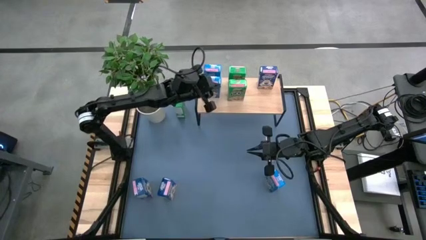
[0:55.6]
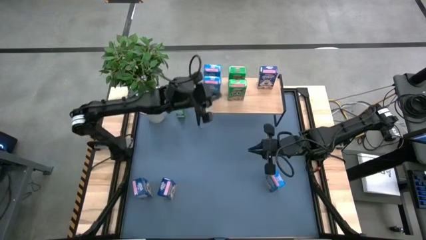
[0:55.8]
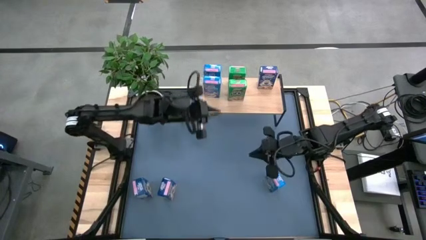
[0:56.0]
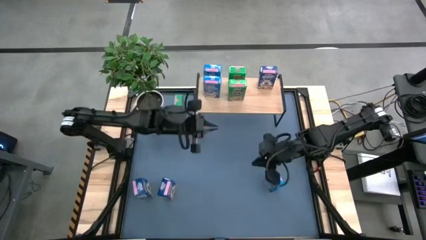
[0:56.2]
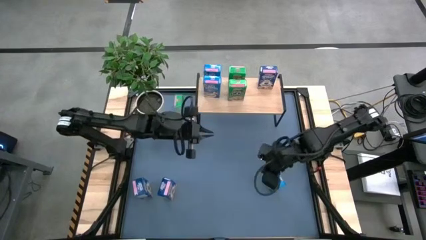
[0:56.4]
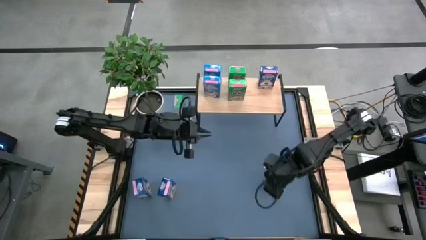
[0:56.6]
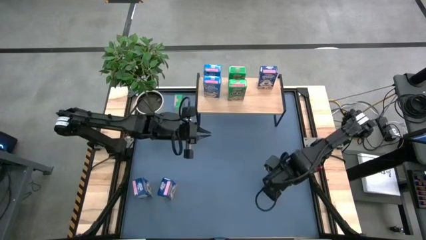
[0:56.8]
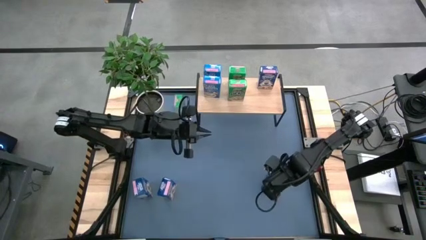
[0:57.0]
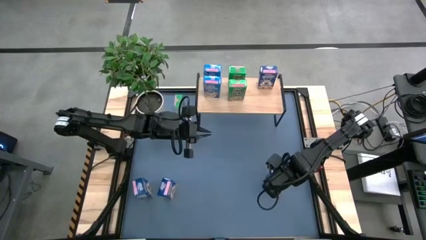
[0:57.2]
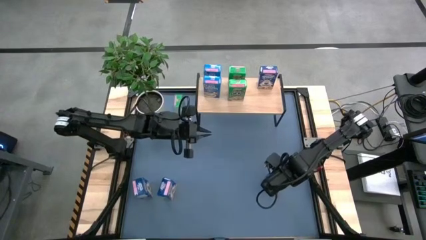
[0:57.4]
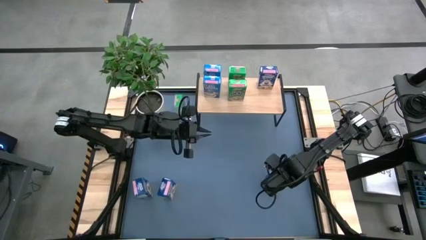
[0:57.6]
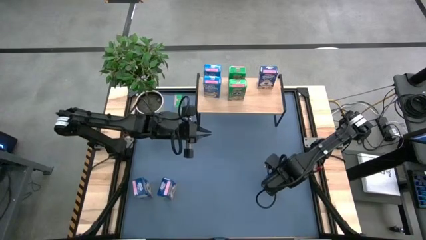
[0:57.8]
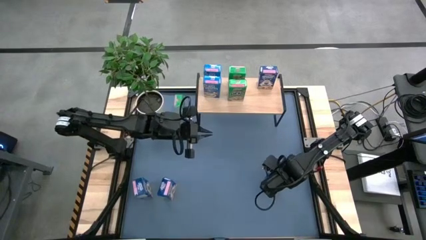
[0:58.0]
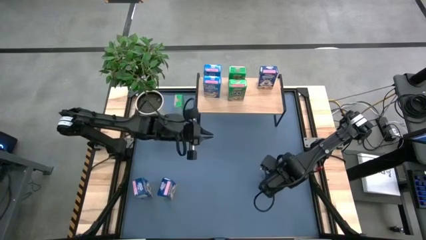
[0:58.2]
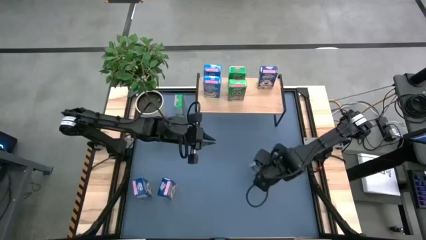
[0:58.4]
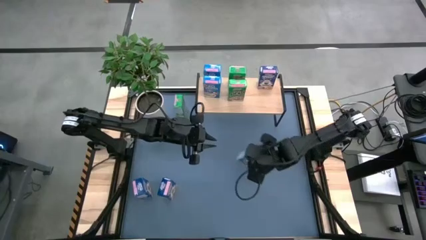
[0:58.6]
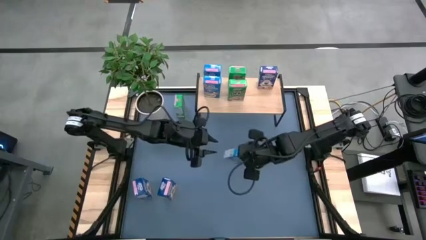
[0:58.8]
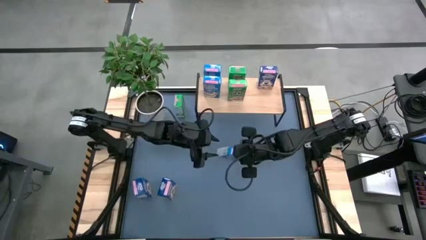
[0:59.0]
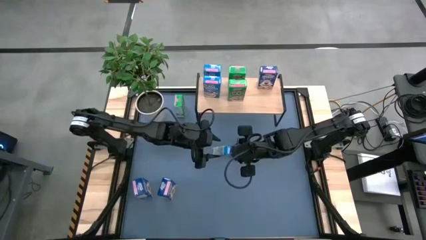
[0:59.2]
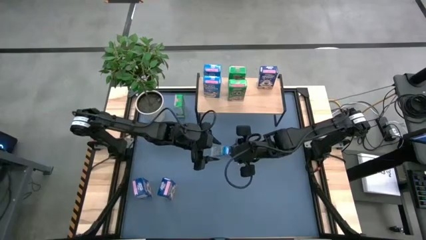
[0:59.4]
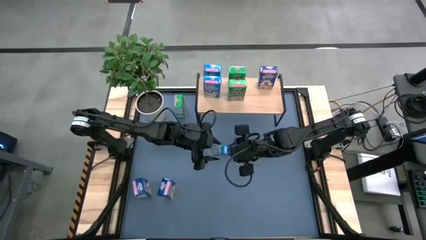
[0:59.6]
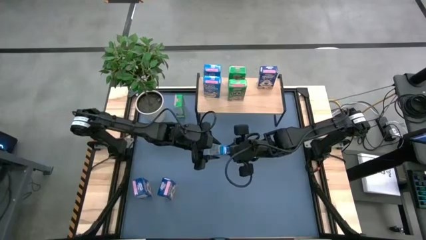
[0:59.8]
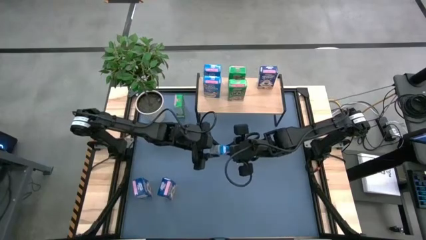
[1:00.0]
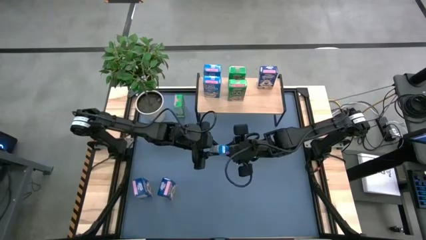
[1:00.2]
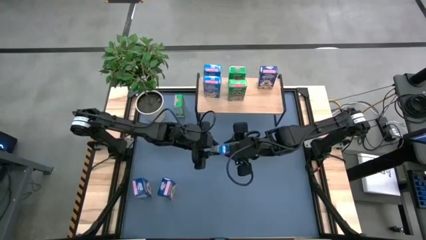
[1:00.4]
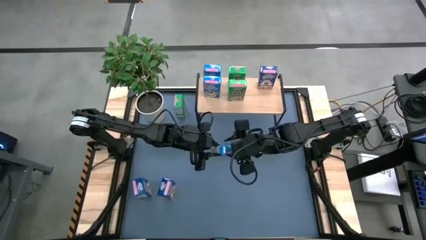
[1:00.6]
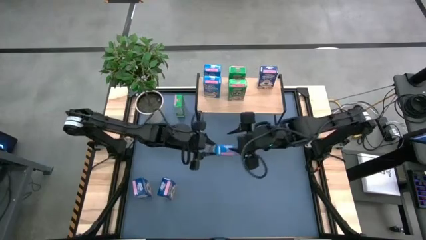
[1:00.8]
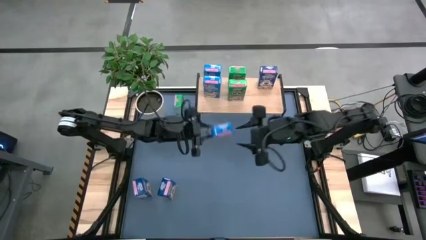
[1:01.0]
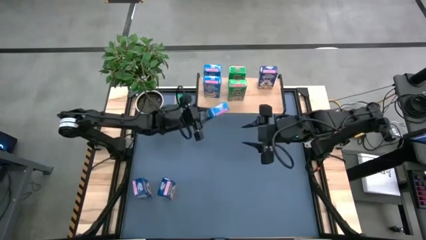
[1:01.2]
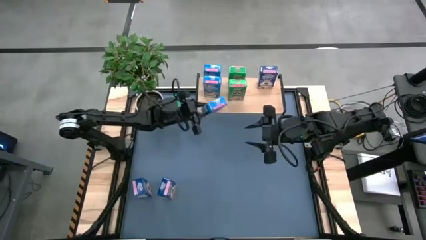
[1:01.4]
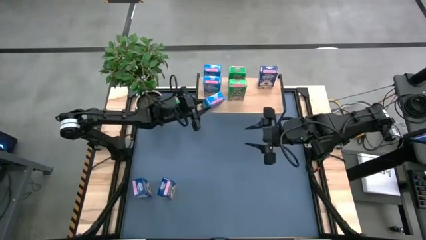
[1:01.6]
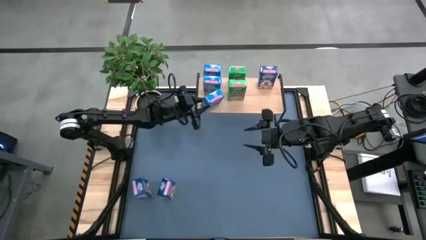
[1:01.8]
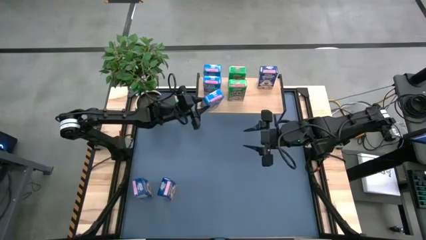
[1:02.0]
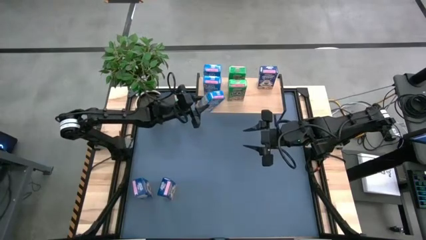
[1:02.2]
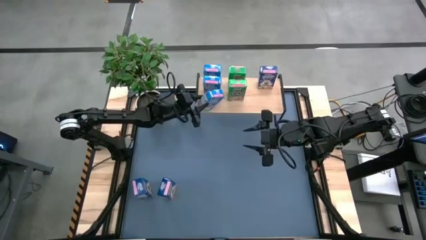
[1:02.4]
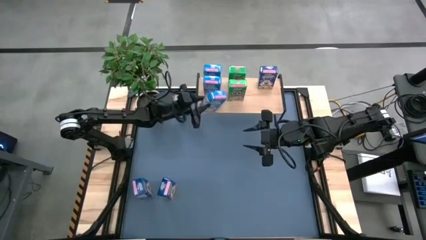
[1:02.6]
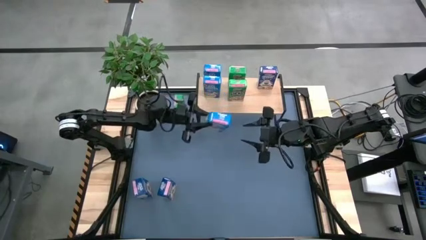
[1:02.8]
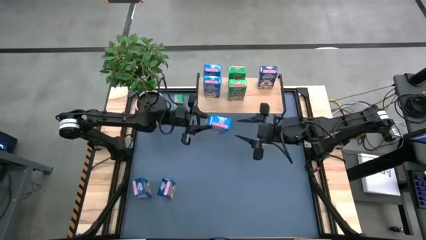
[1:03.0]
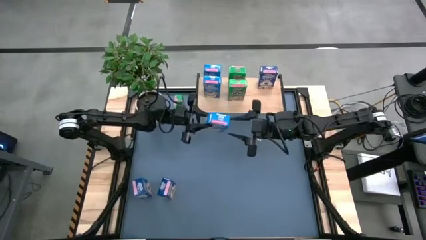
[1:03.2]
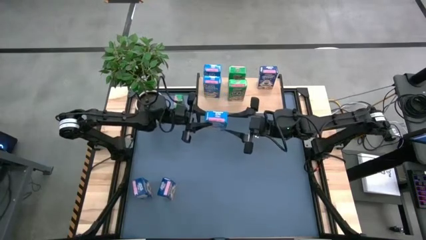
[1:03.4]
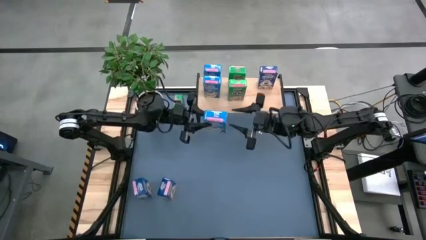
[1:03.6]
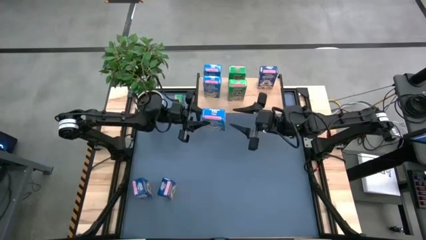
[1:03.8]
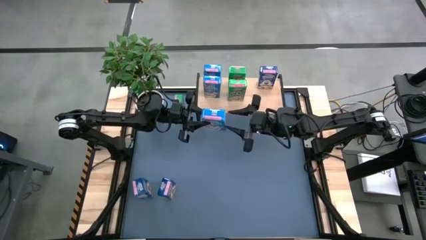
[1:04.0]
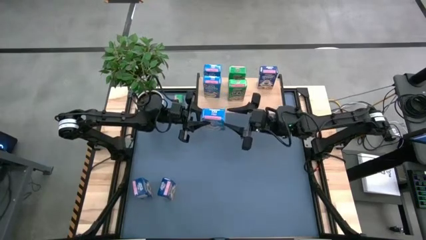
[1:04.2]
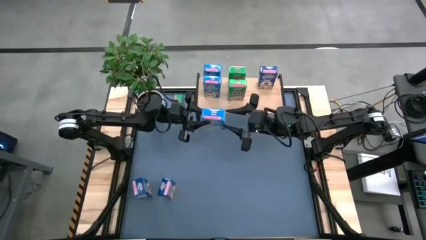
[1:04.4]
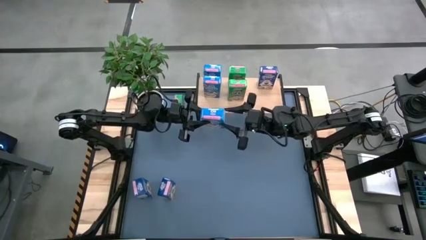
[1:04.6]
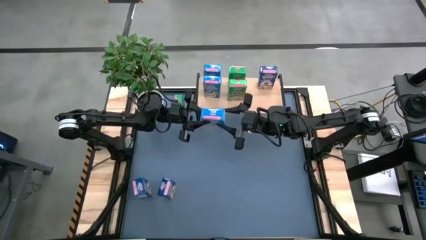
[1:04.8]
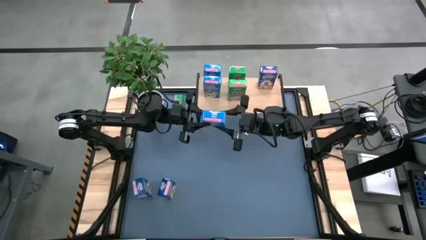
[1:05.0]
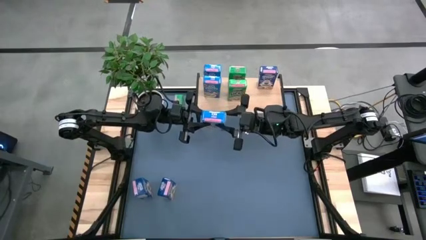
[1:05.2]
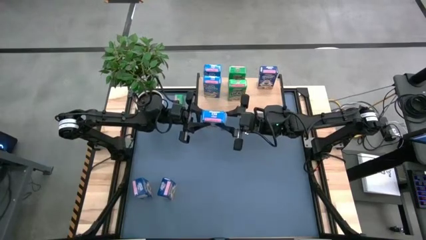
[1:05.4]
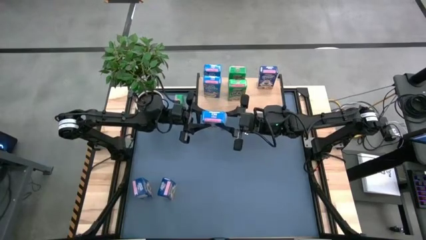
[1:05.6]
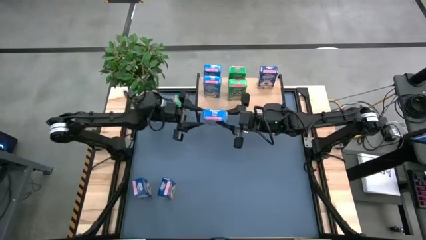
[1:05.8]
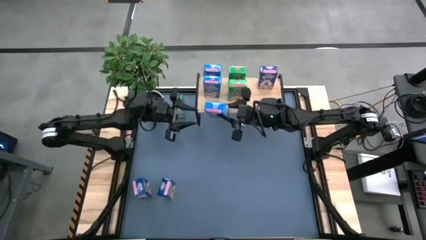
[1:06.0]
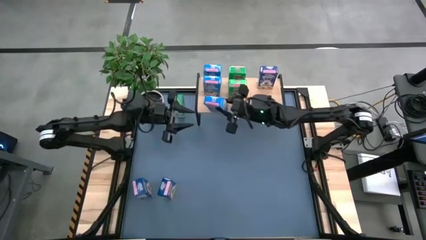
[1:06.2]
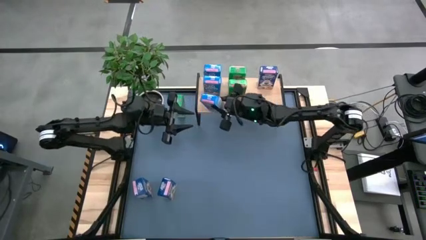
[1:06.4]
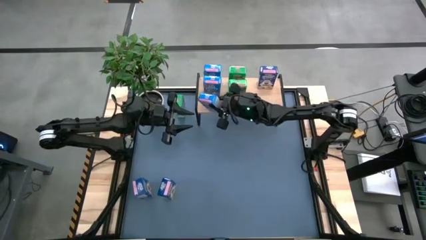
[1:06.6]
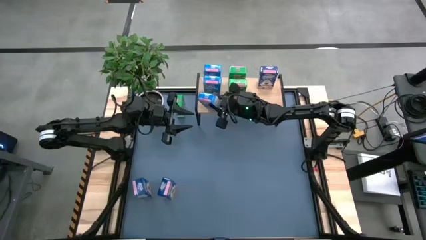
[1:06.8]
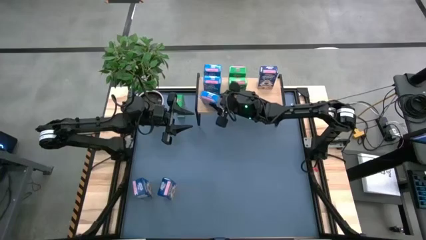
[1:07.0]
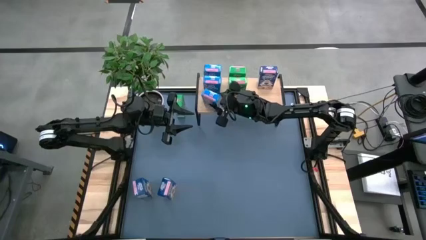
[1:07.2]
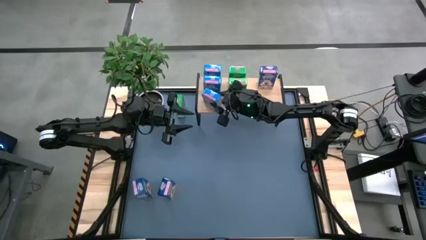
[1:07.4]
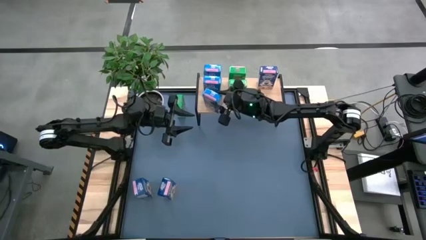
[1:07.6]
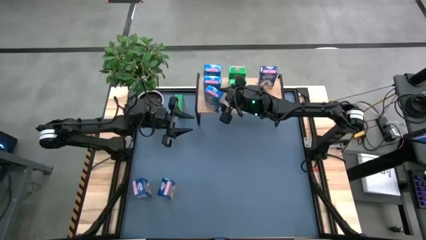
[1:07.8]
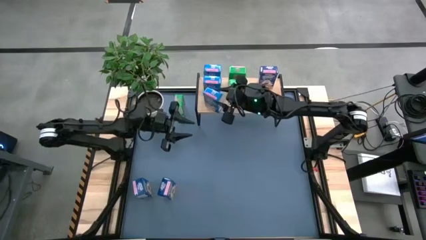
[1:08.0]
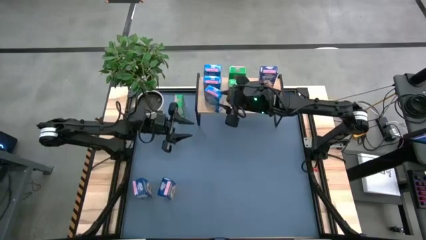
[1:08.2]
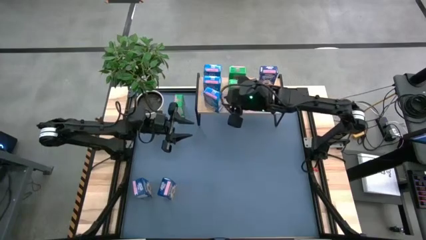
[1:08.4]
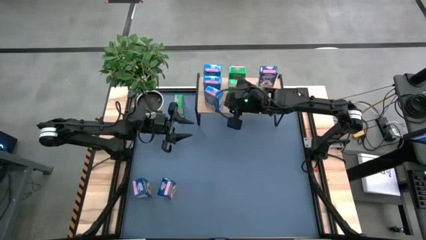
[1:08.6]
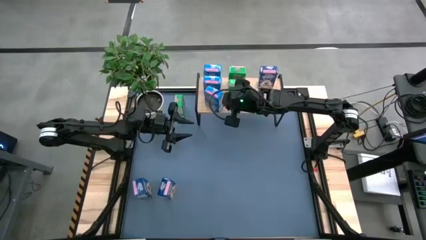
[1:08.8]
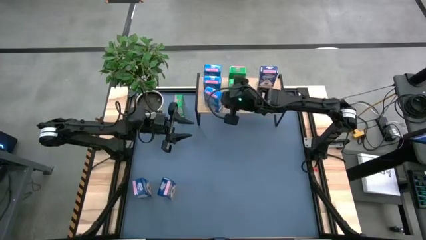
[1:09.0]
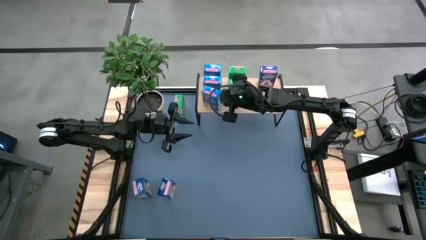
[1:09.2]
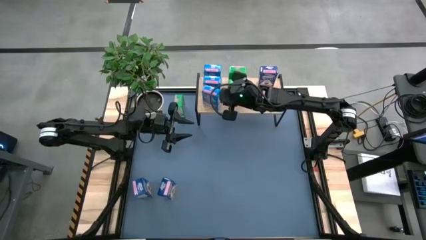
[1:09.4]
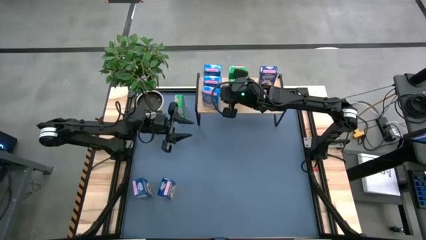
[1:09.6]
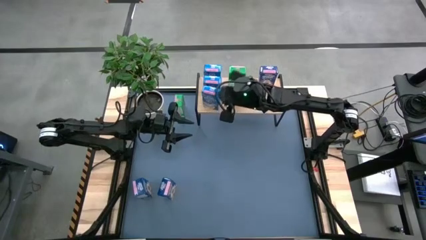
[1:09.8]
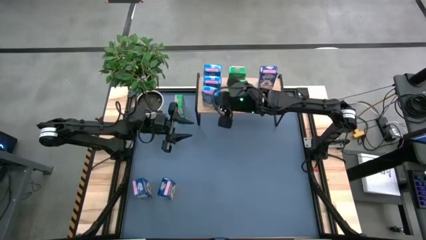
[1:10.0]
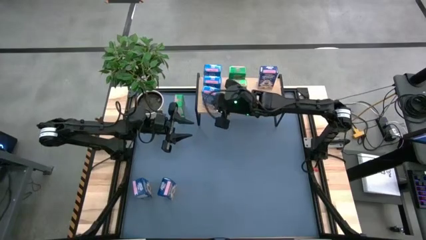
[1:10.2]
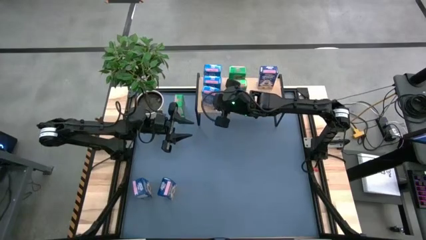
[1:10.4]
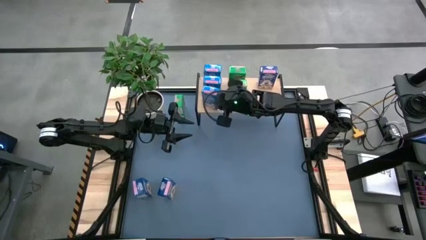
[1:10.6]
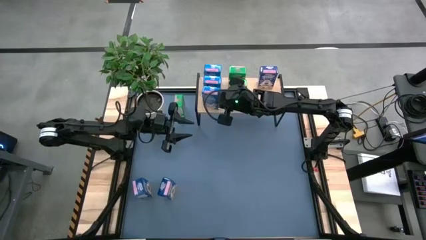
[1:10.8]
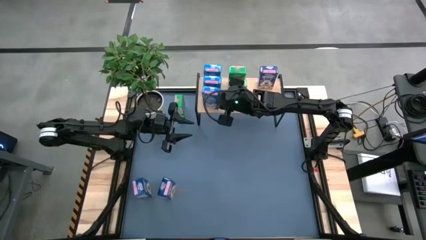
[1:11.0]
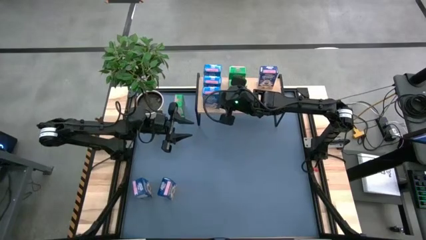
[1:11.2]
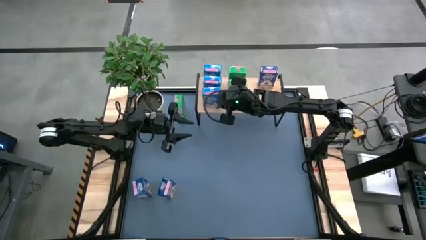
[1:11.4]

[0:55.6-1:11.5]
Task: Stack cereal on shelf
Put the light blue cereal box on the shelf aligned with the other light blue cereal boxes
